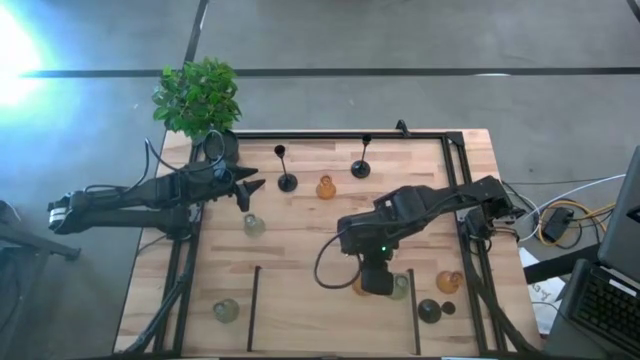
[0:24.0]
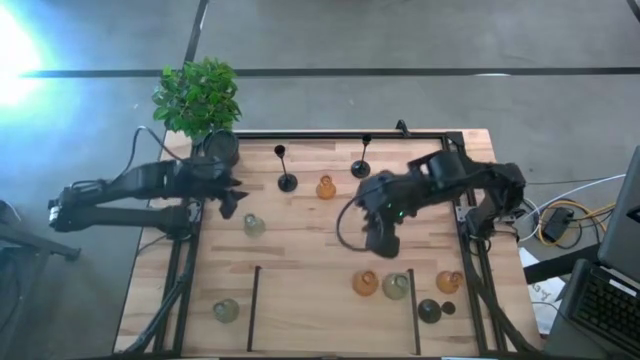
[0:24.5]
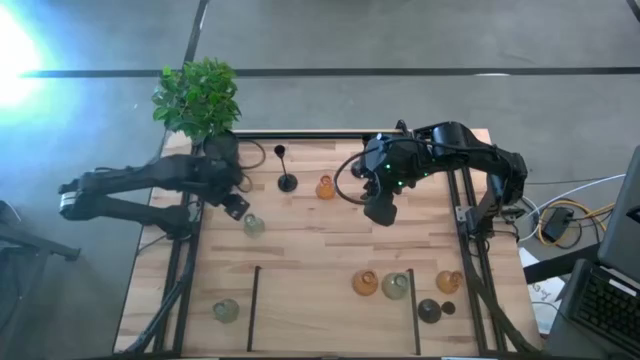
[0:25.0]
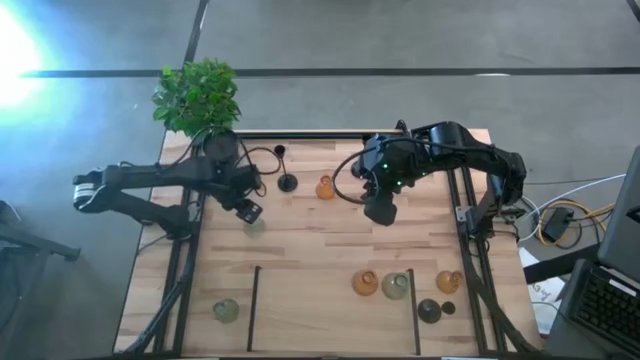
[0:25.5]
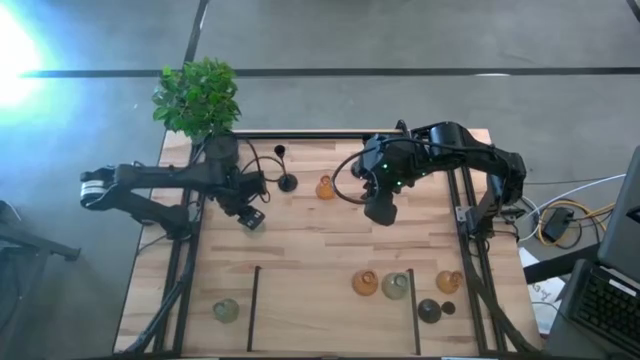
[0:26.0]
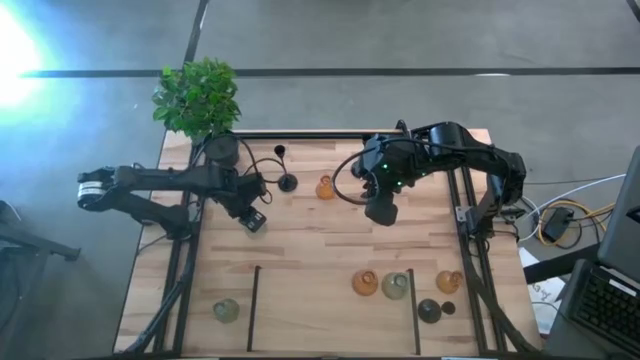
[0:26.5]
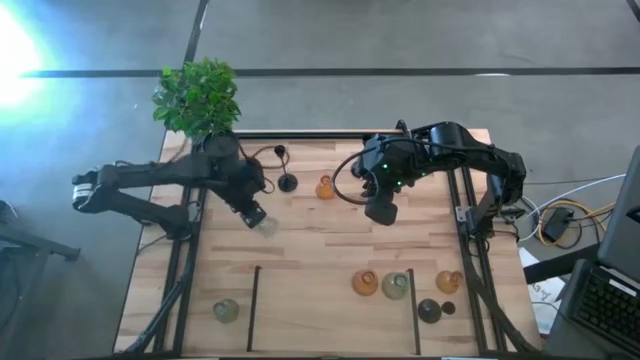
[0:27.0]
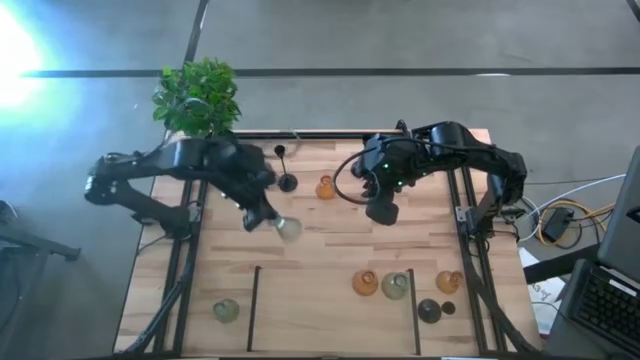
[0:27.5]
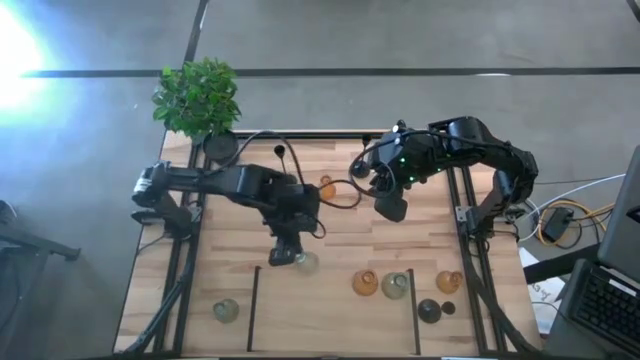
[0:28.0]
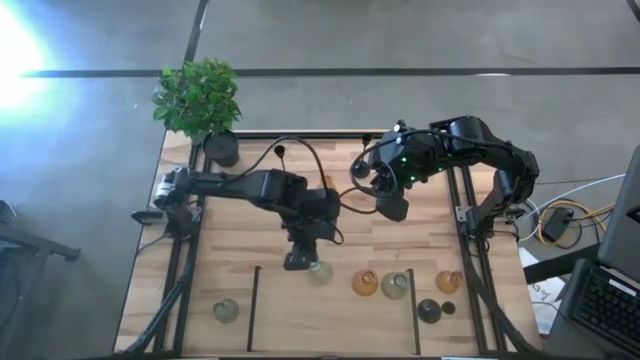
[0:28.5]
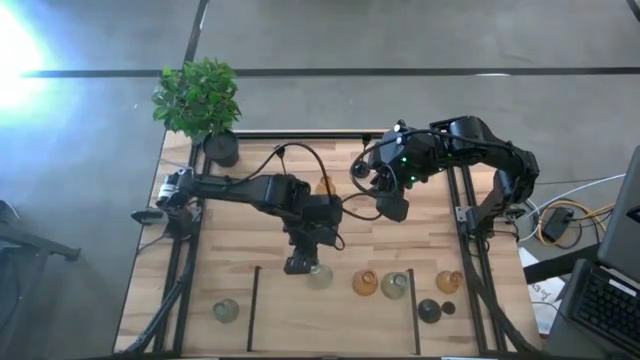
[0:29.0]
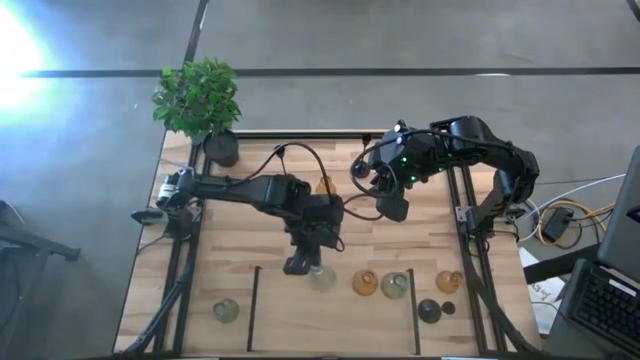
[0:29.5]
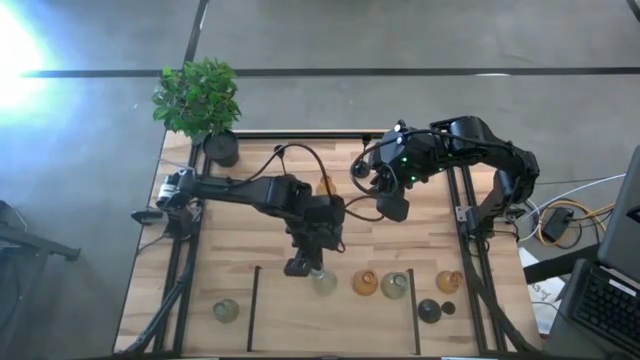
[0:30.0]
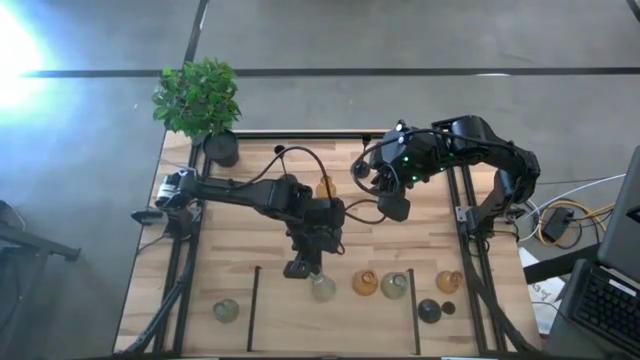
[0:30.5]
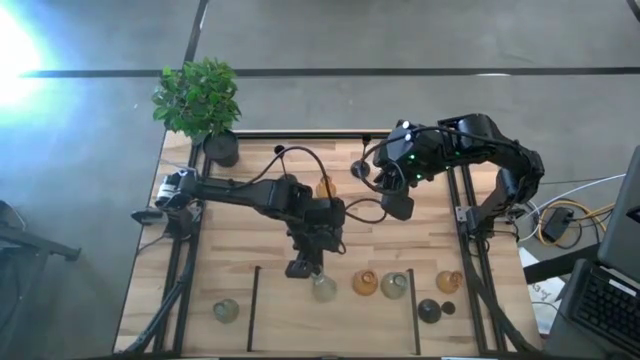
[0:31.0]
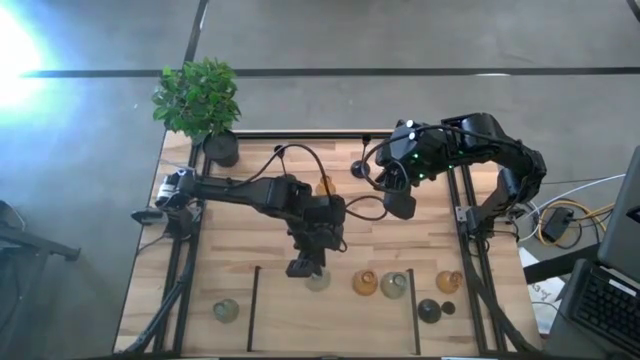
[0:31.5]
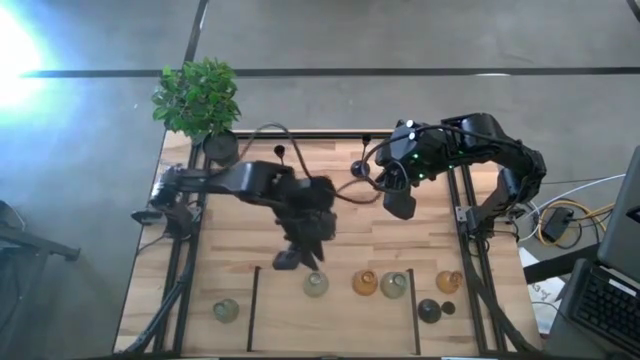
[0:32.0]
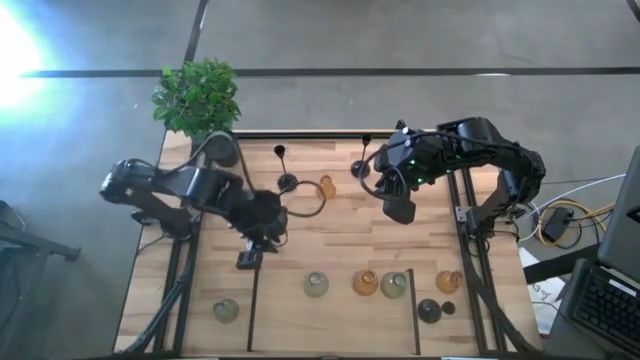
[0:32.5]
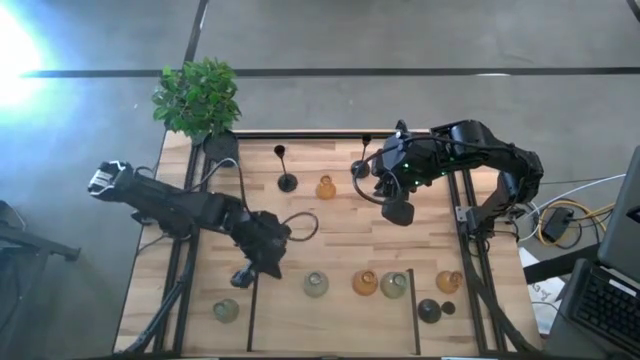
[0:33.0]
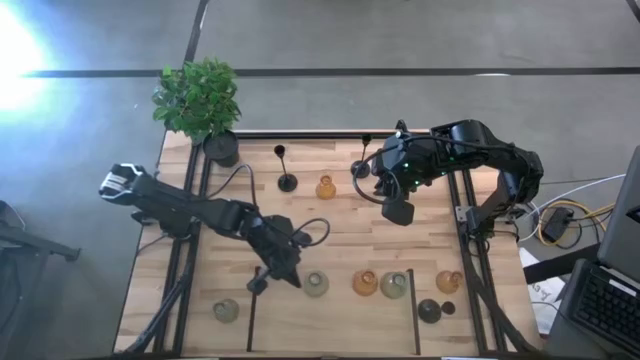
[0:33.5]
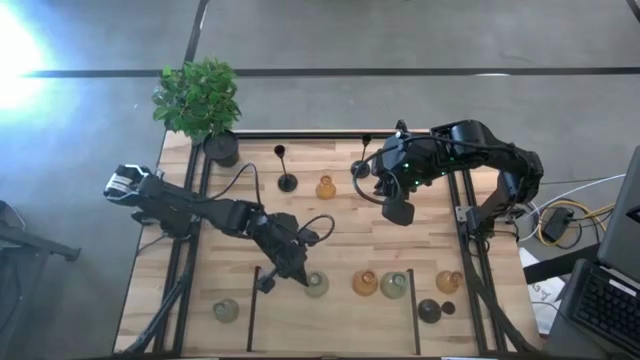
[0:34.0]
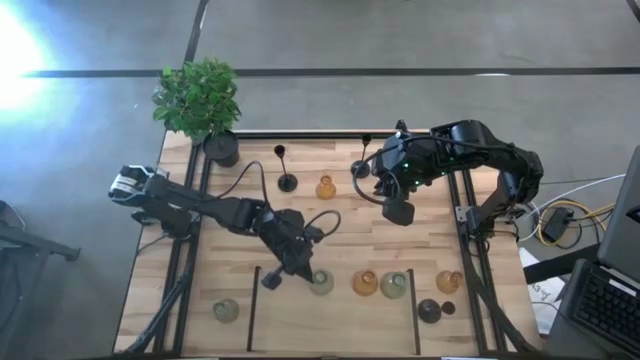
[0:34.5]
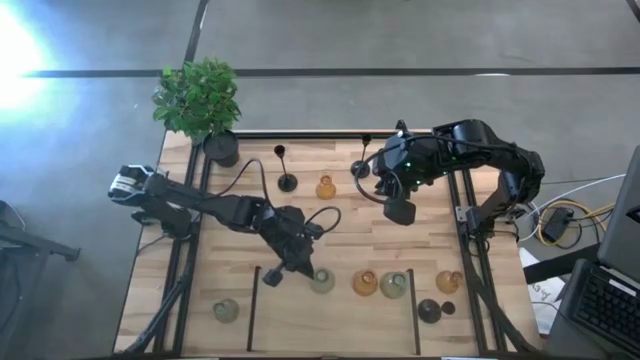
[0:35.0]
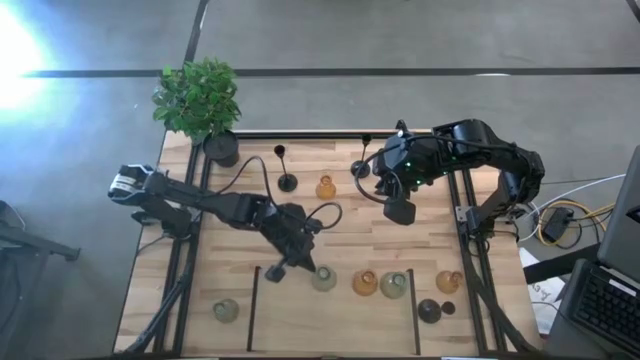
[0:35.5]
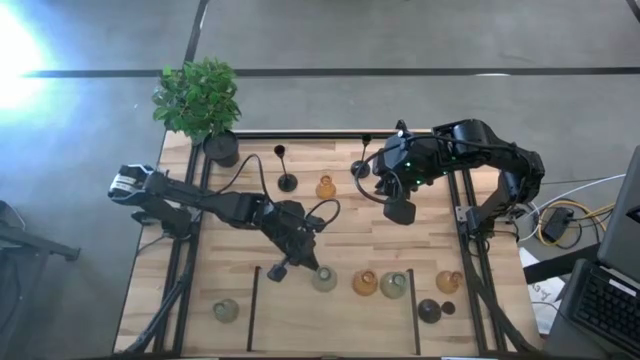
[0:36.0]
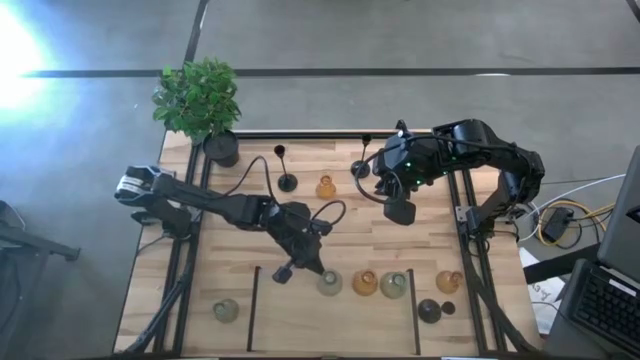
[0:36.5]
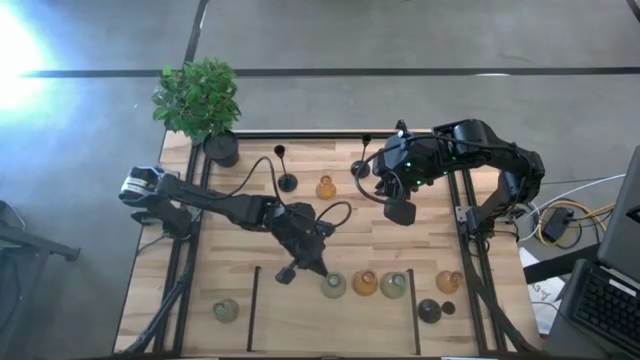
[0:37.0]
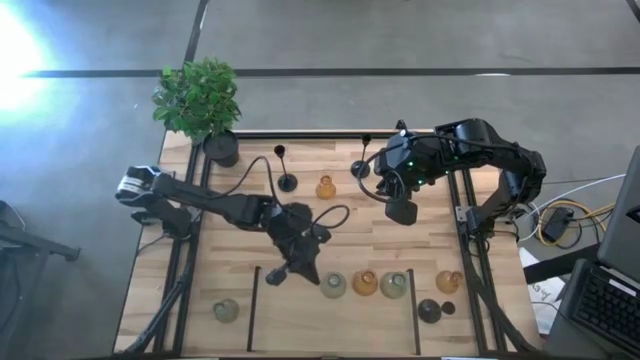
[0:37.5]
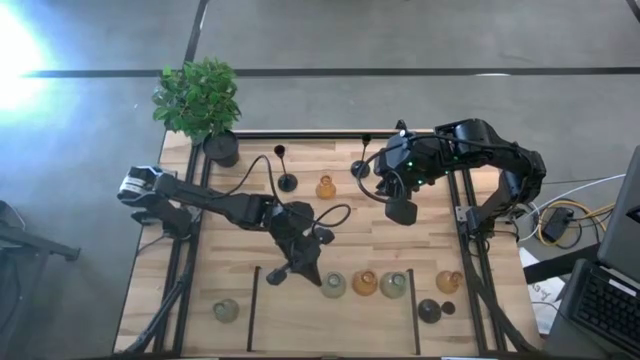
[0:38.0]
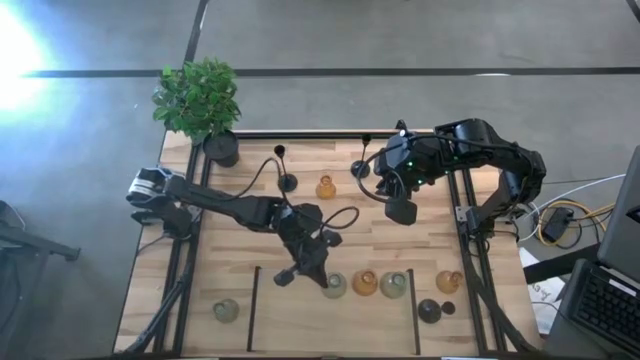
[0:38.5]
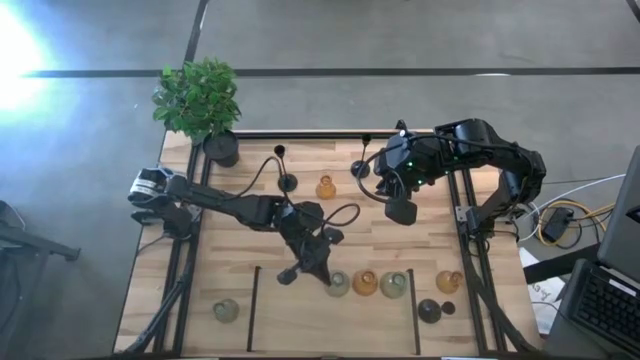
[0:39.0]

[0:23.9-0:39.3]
Task: Pick & Place candle stick holders
Put the top green glass candle holder on the shelf

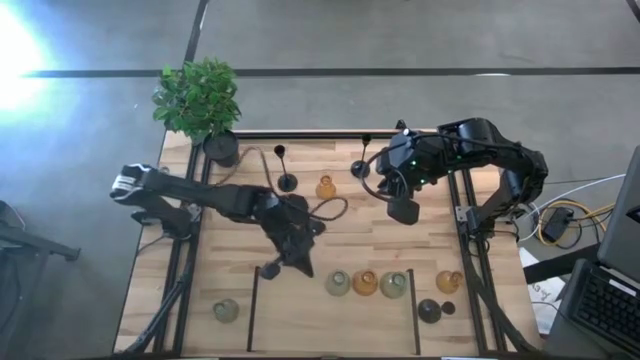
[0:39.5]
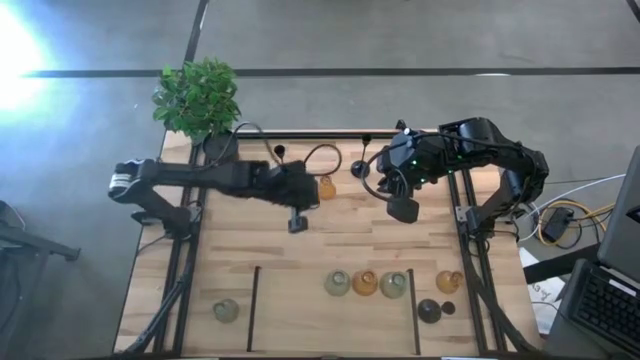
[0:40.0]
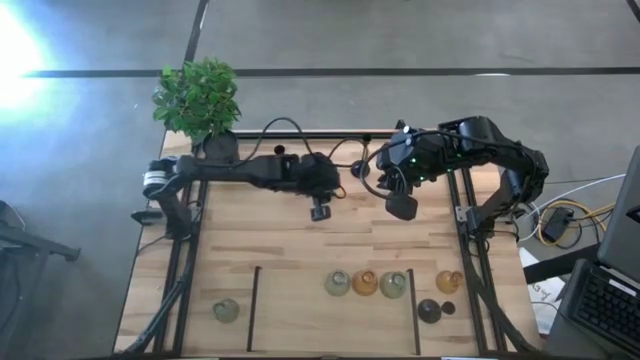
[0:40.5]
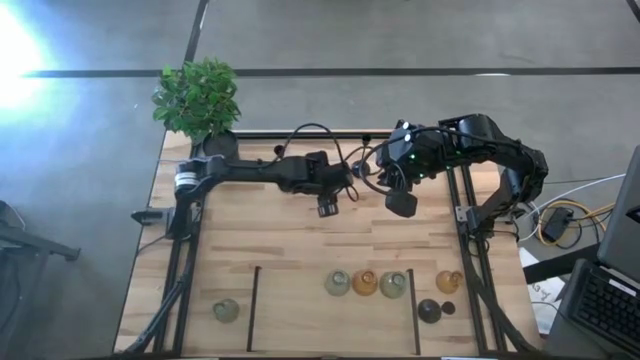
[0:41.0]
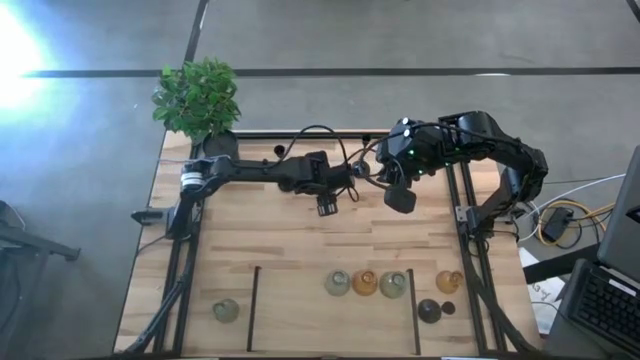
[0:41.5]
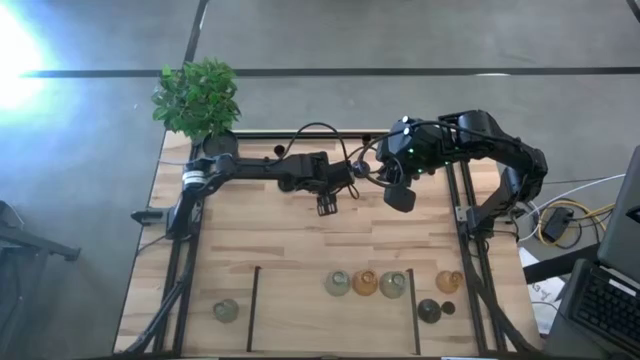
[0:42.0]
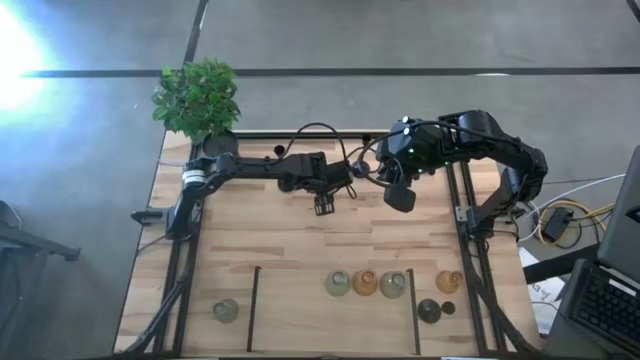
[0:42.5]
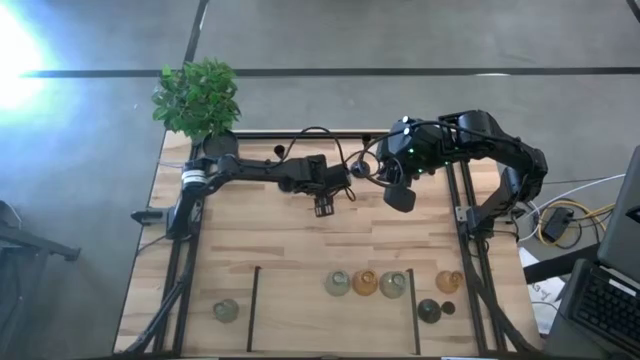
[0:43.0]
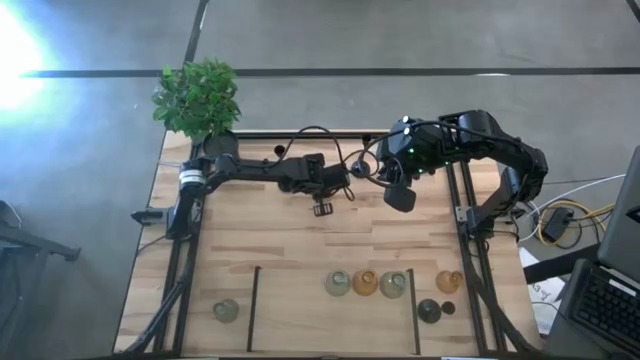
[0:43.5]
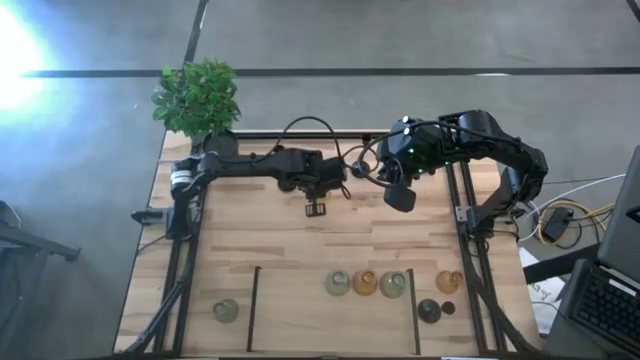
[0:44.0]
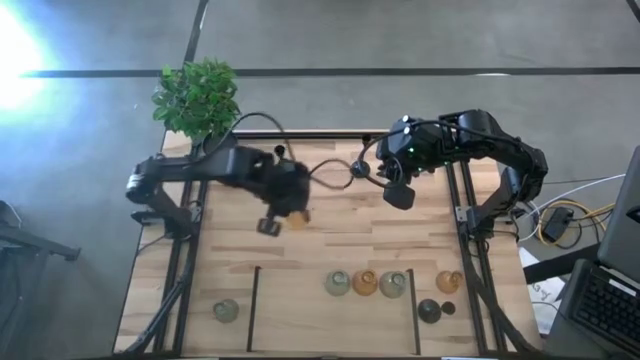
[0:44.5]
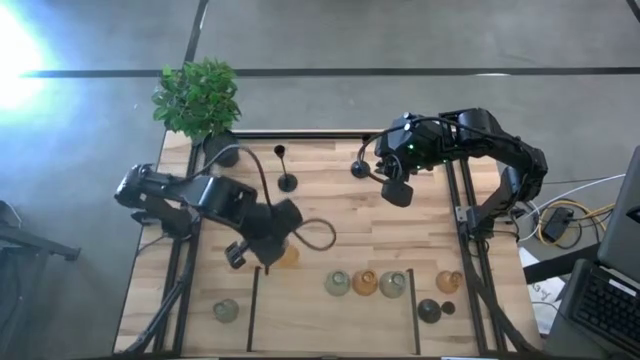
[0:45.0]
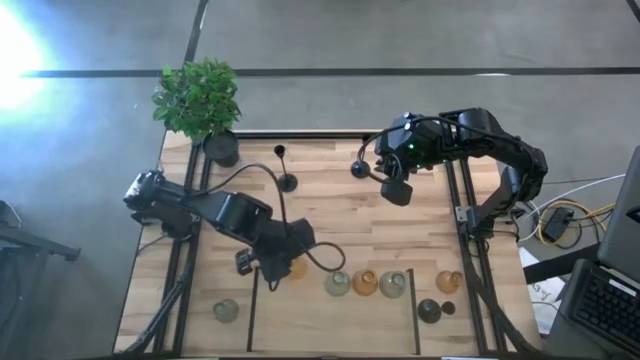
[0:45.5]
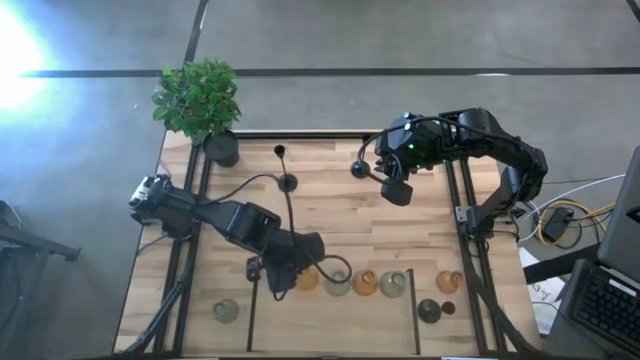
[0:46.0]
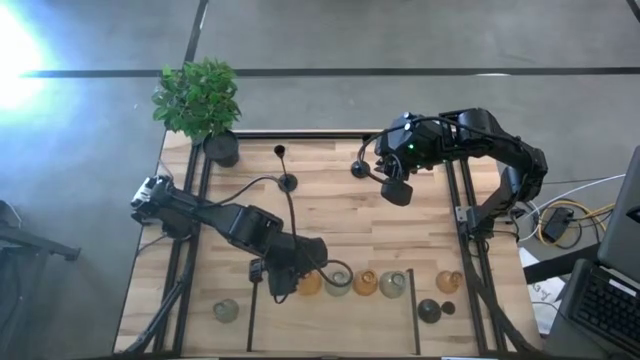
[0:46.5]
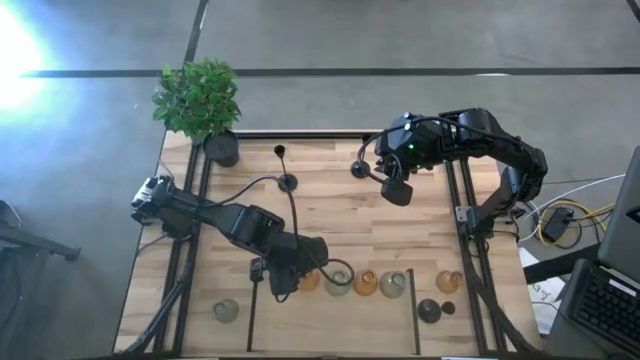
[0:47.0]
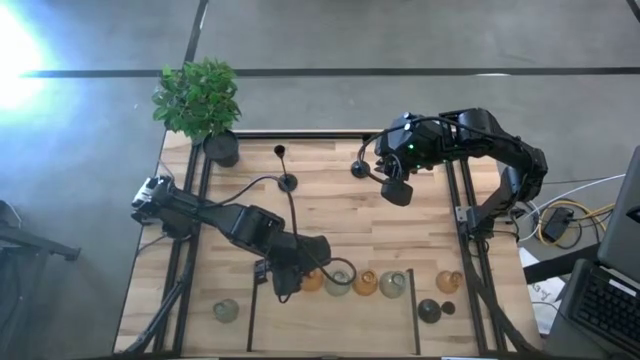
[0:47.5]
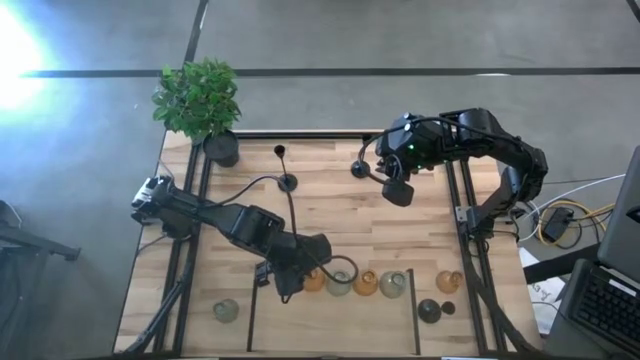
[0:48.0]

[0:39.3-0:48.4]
Put the top orange glass candle holder on the shelf
